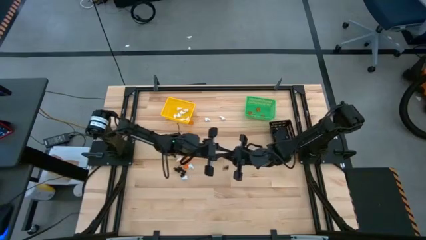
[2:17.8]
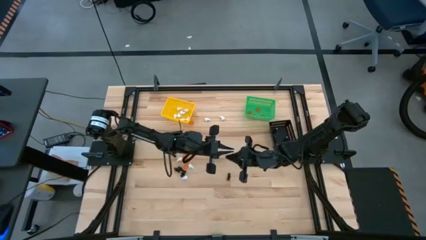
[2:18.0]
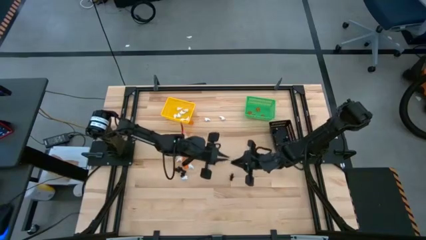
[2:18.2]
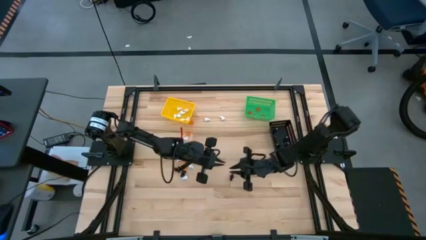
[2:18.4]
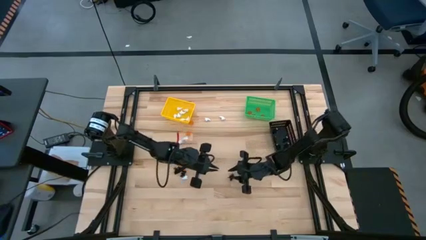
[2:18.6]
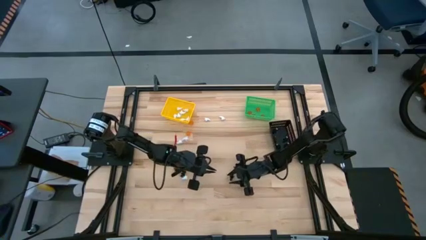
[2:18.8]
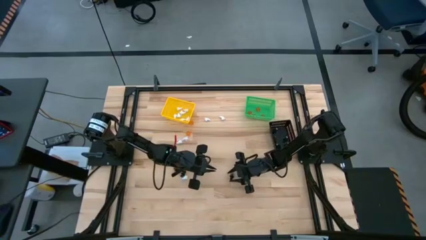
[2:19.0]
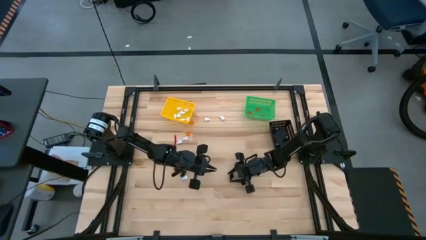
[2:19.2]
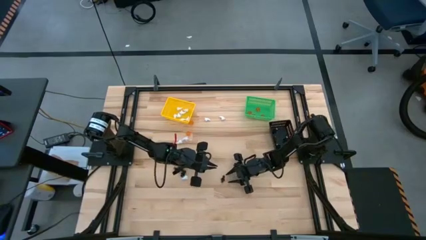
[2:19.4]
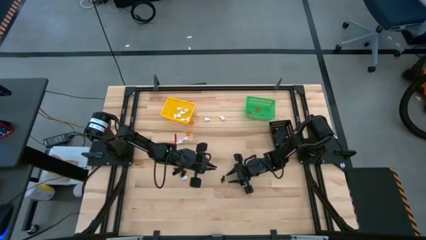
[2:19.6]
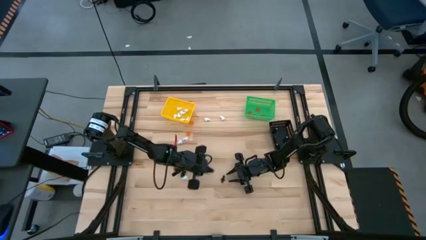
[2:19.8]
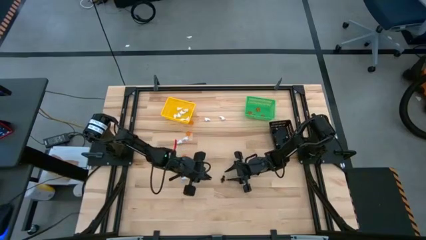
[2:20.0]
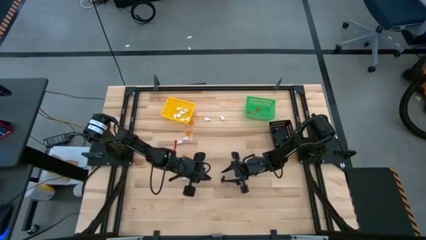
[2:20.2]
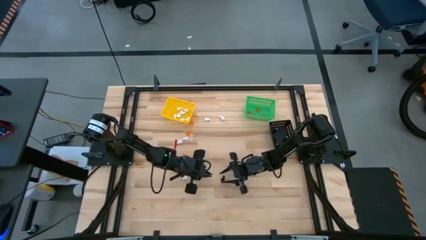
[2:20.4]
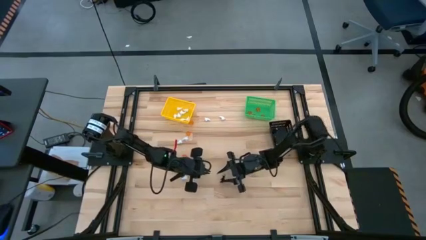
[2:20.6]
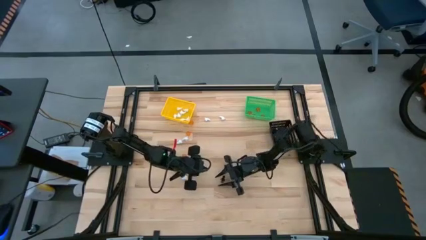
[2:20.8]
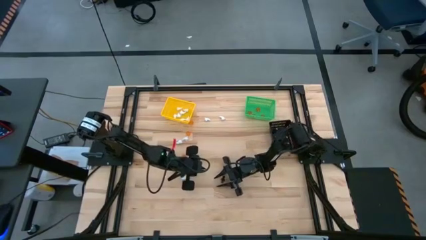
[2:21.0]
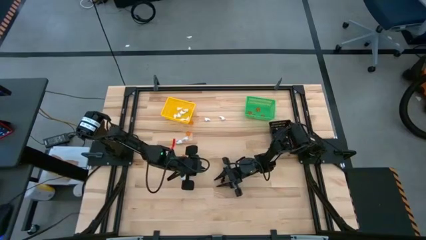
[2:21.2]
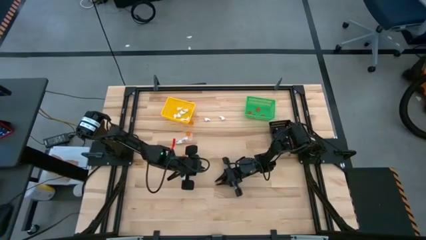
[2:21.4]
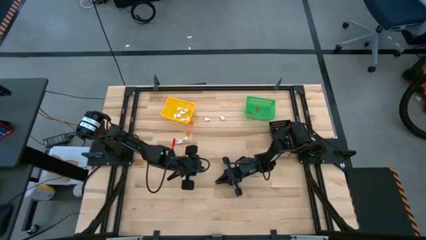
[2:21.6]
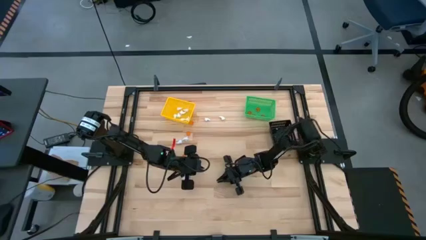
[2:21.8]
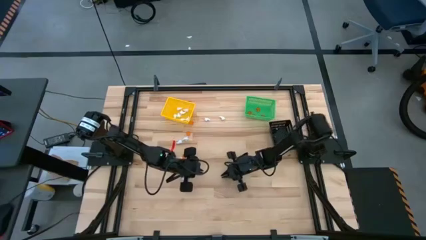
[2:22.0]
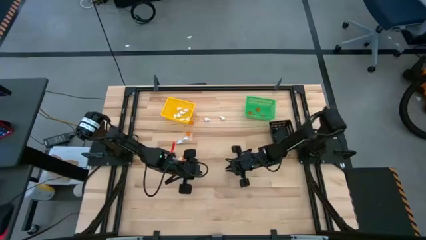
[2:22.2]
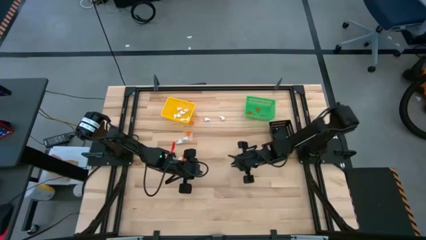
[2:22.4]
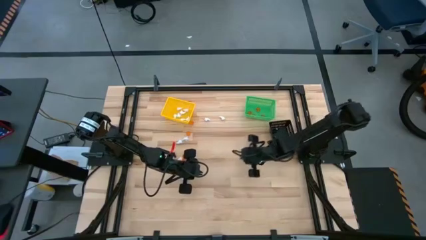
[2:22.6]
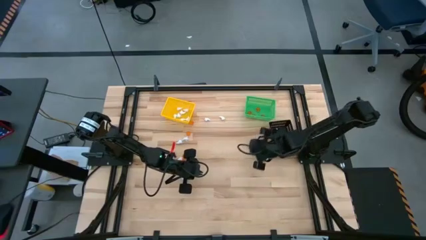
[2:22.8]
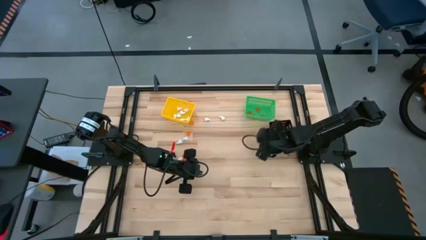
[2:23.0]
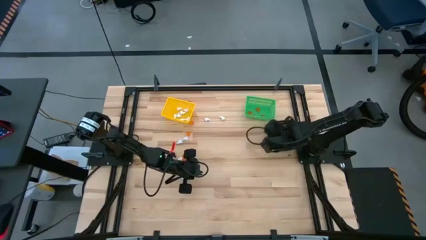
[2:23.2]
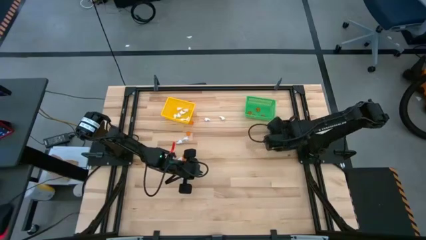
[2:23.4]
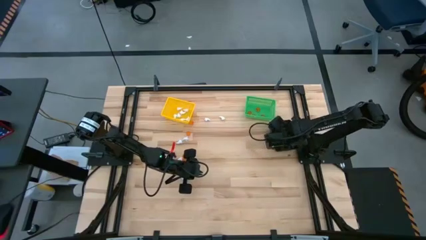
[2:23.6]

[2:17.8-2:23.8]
Task: Sort Halloween decoration
Put the black skeleton toy into the black bin

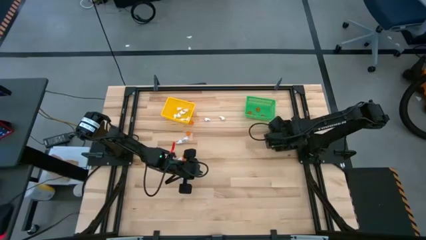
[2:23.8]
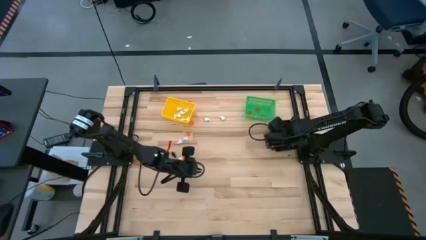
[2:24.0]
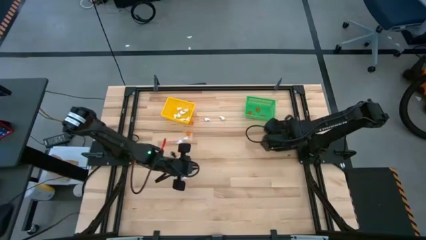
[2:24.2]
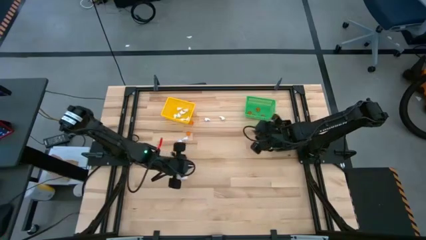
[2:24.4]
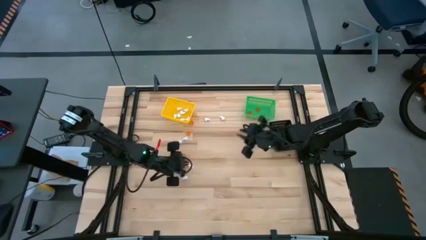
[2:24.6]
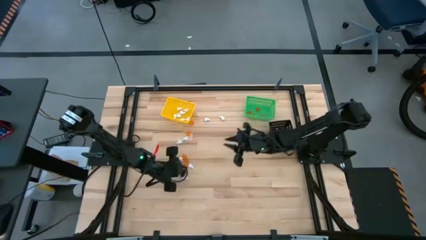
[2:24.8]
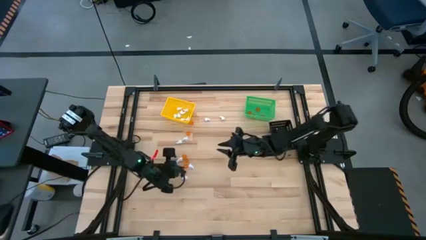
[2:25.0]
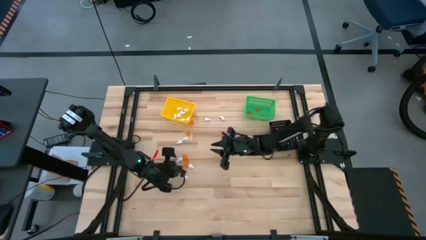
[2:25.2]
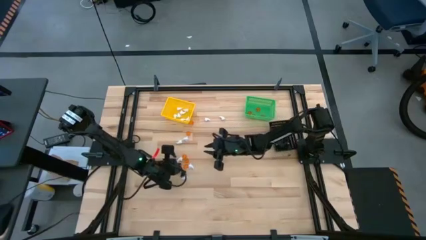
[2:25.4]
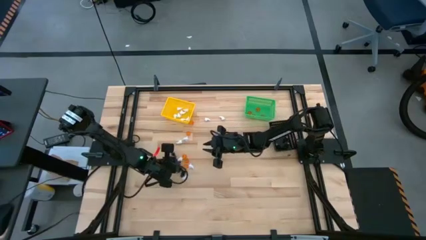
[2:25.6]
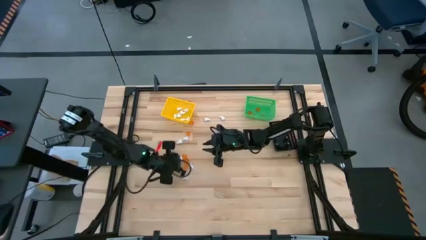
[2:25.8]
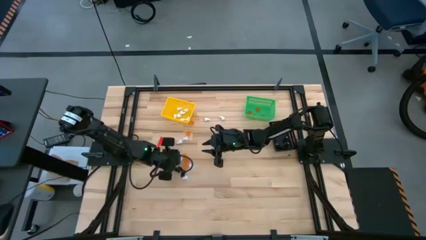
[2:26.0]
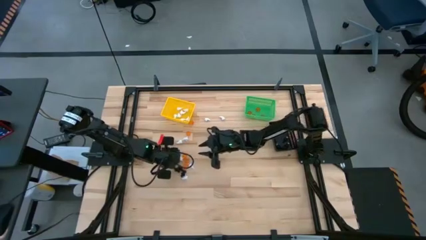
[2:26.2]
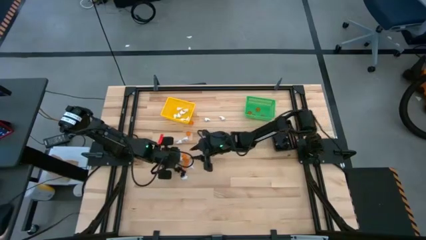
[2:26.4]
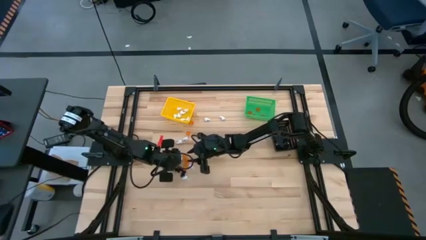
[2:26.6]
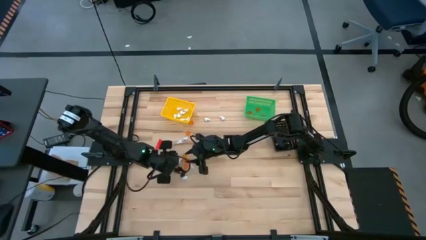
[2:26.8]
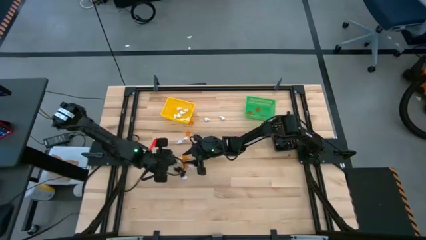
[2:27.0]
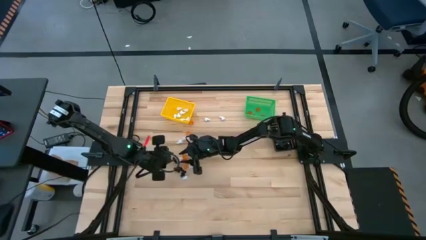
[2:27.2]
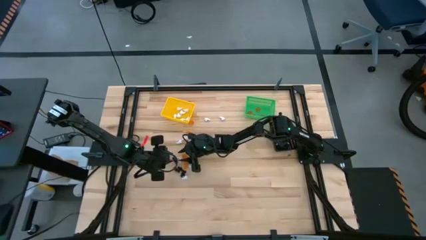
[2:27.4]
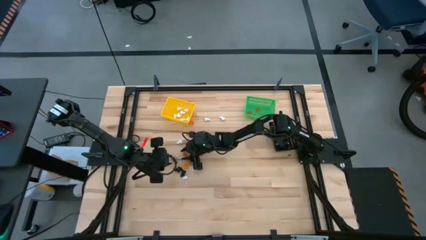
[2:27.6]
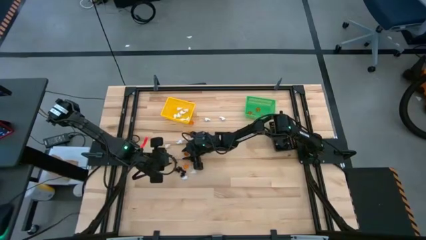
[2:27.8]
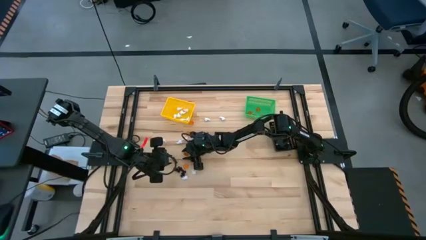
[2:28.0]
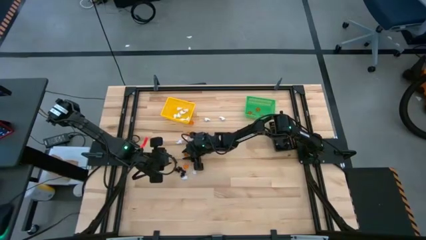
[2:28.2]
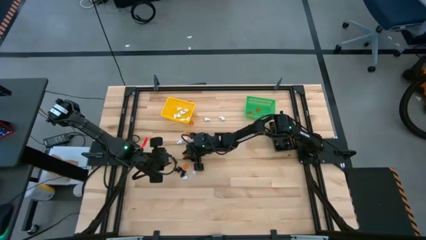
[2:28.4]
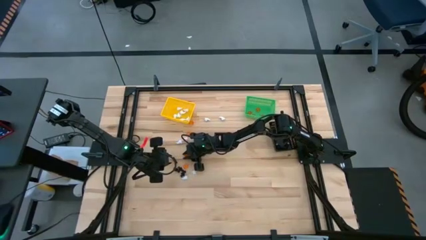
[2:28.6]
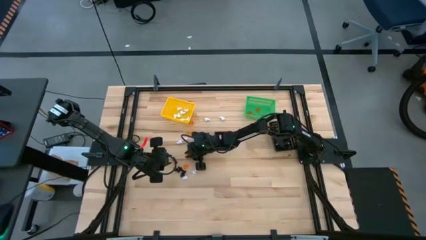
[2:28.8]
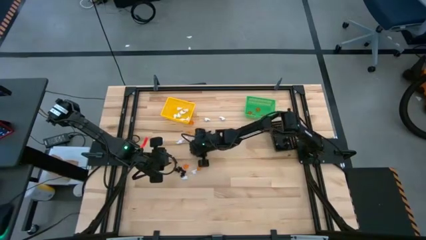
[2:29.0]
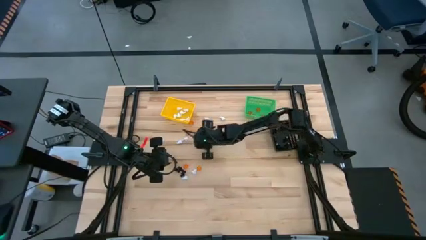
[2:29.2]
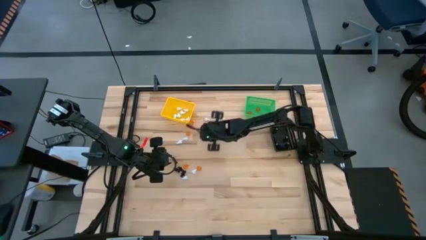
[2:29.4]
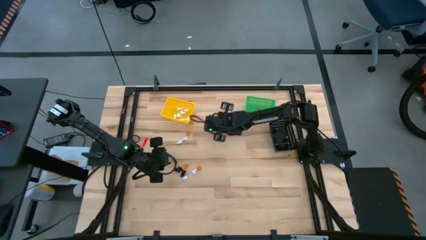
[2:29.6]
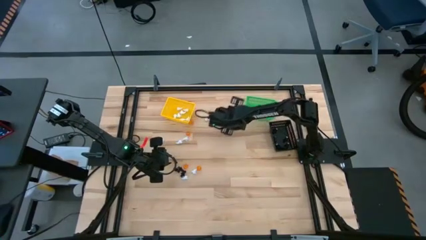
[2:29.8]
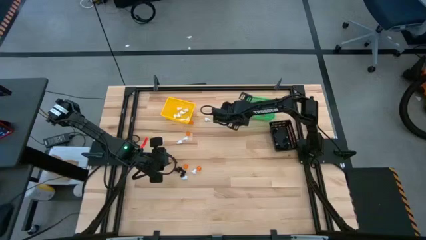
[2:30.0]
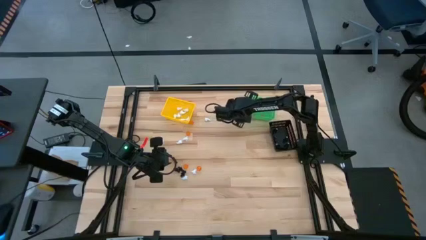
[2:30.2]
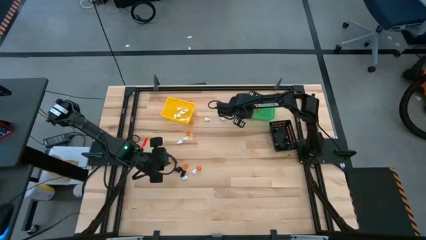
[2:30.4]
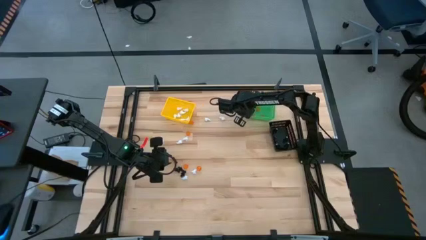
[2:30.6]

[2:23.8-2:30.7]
Put the orange pumpkin toy into the green bin

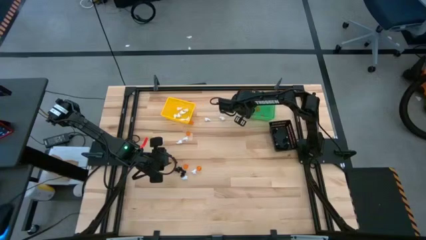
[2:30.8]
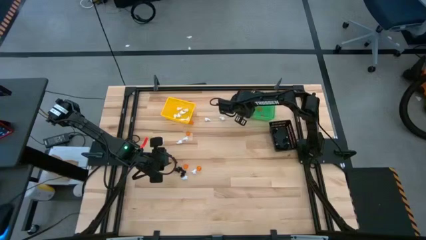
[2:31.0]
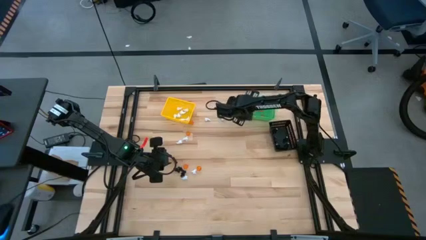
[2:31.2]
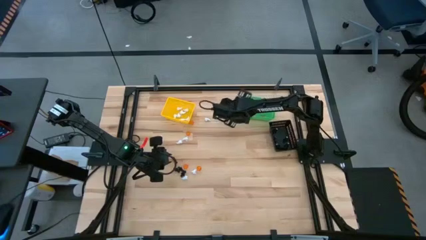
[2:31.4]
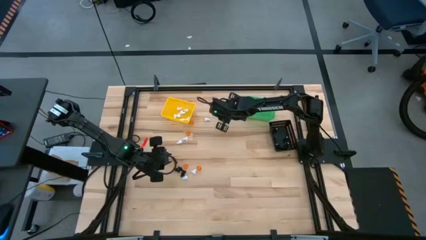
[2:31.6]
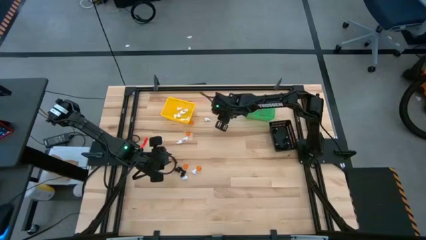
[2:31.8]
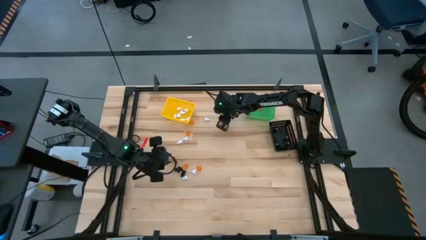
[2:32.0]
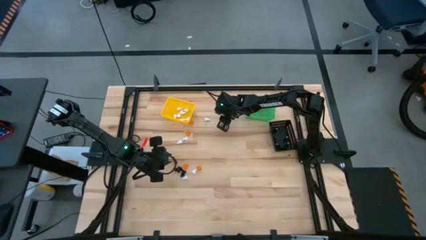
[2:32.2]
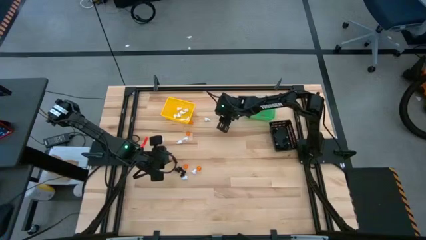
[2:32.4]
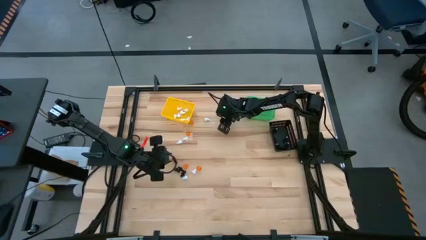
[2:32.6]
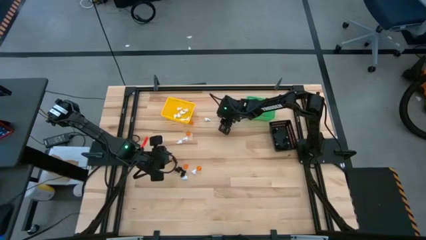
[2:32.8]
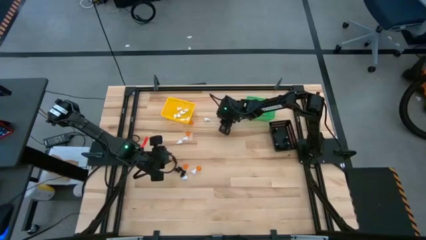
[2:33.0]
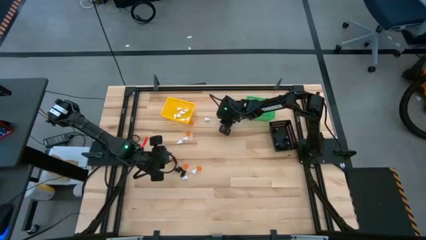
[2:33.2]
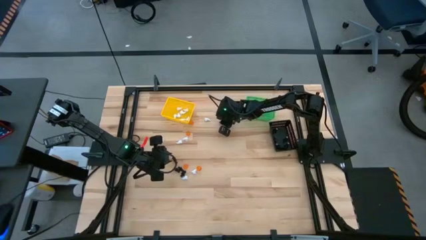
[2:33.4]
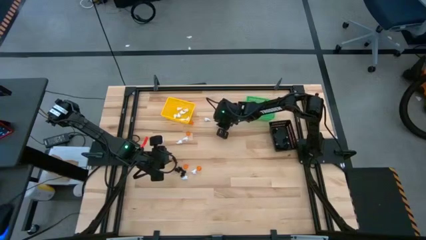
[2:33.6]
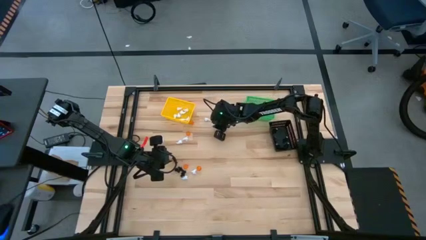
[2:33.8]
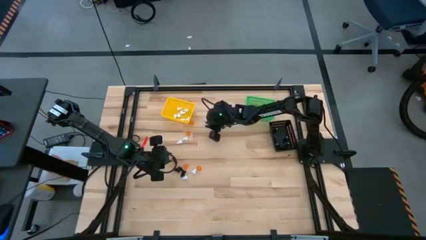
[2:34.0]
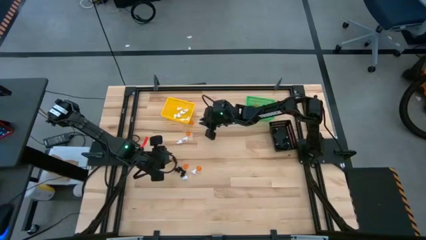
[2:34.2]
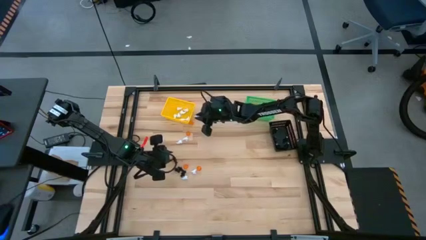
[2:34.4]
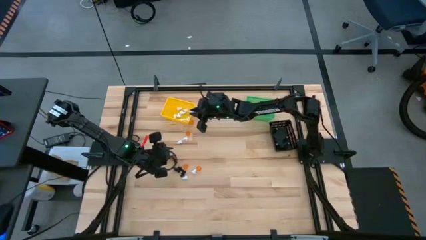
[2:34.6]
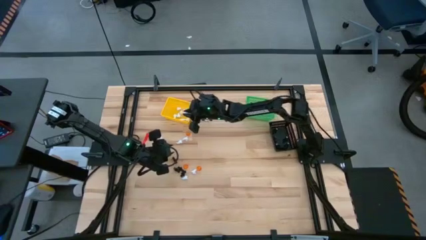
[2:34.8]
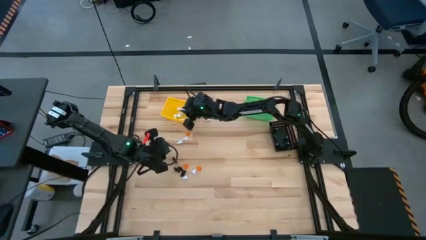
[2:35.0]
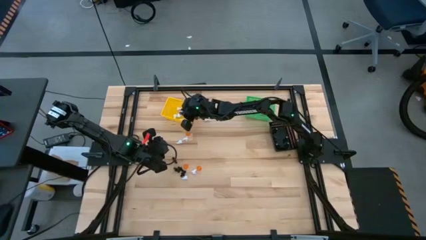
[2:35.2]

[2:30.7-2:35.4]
Put the white ghost toy into the yellow bin
